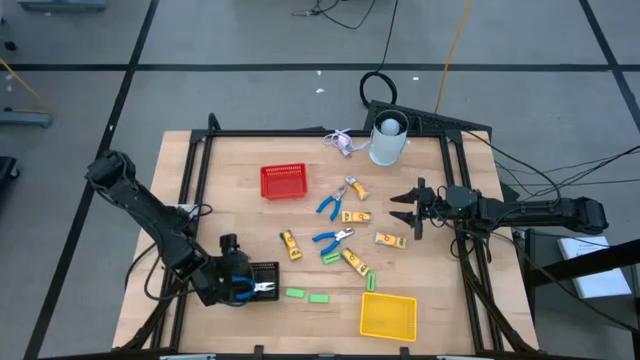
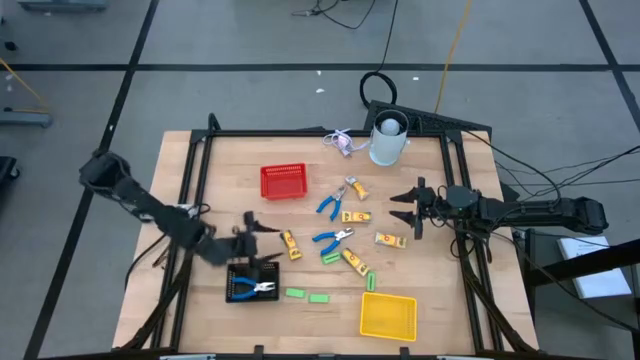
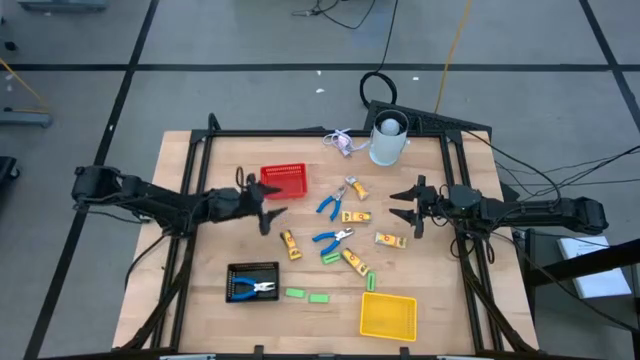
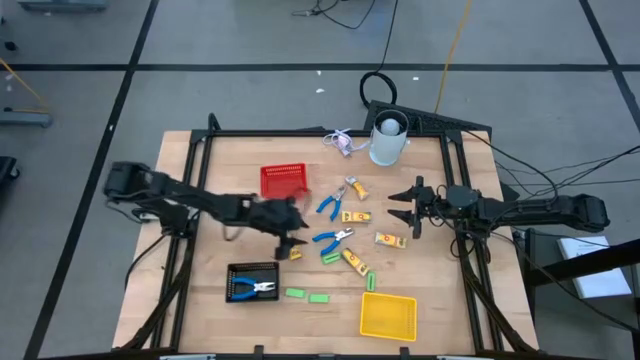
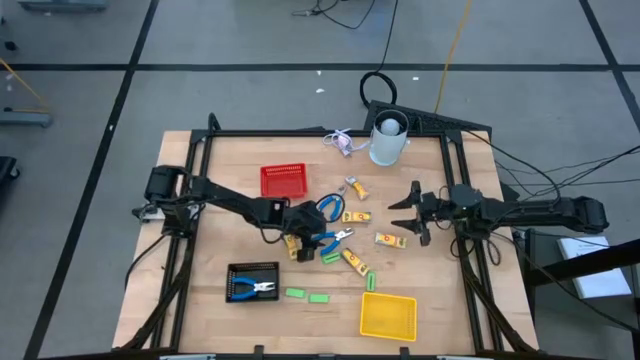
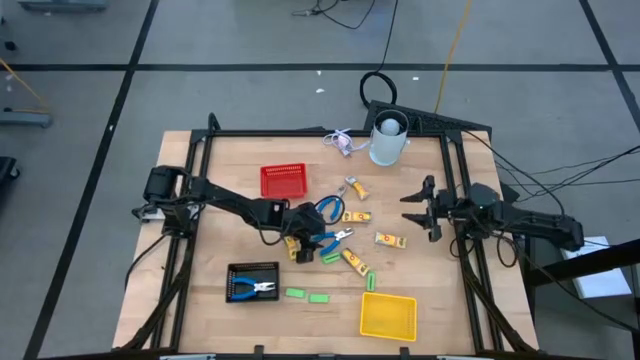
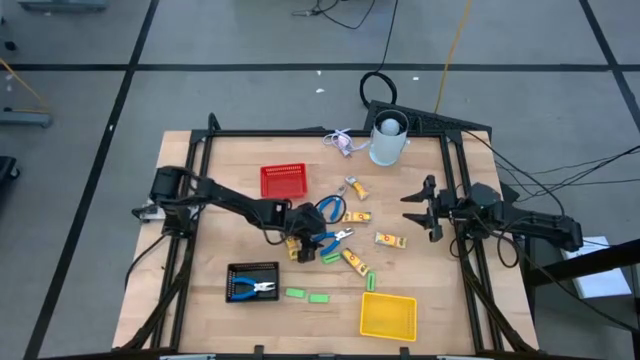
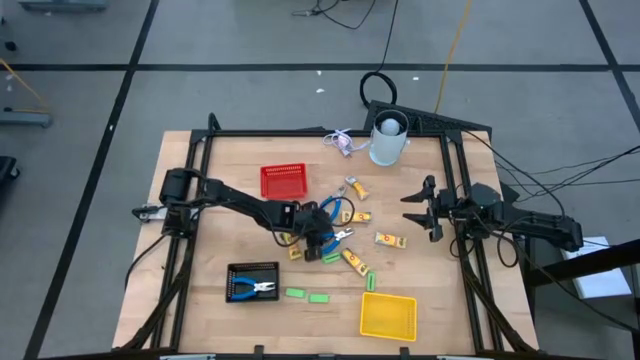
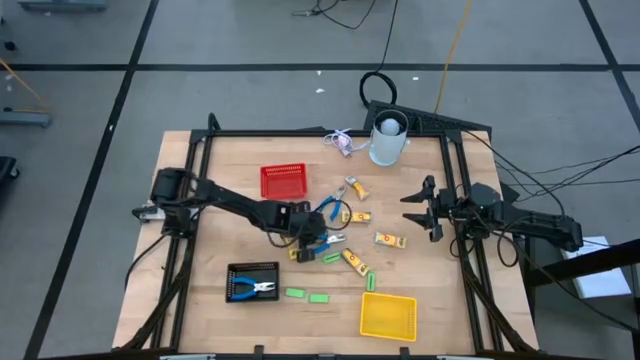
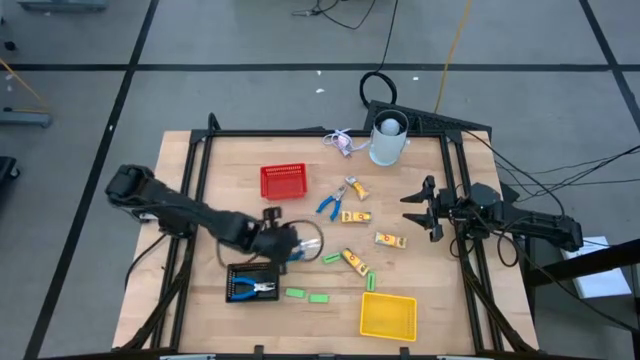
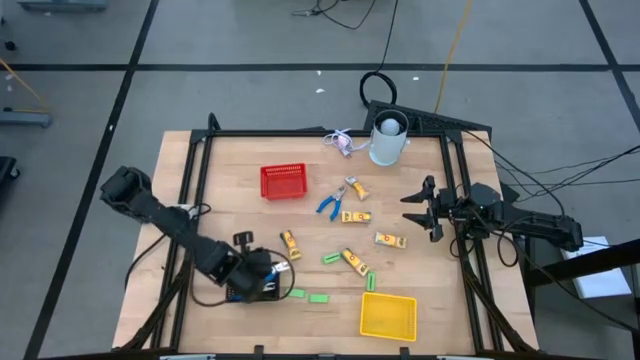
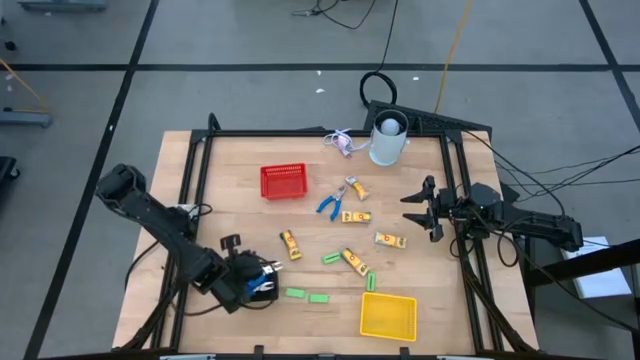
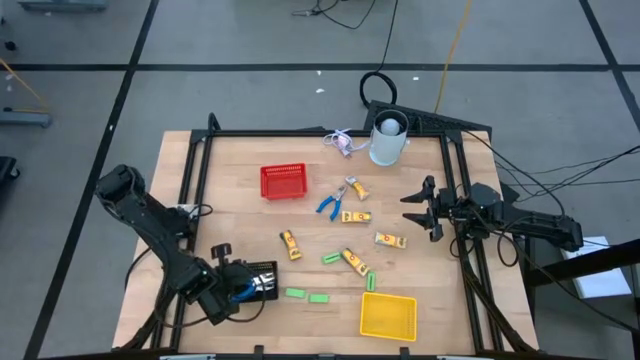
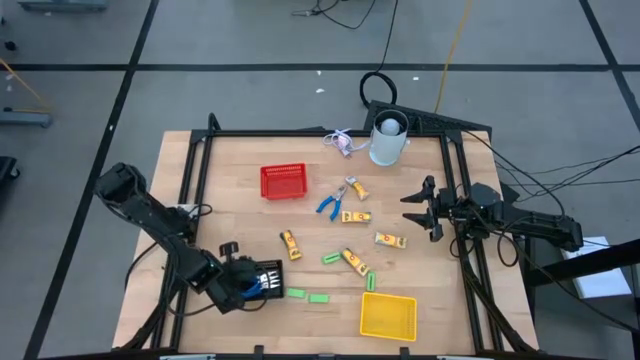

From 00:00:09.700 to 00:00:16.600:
Task: Pick & Place School Supplies
Put the blue hole punch into the black bin

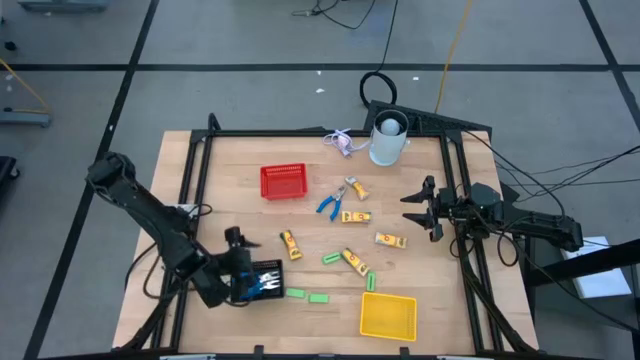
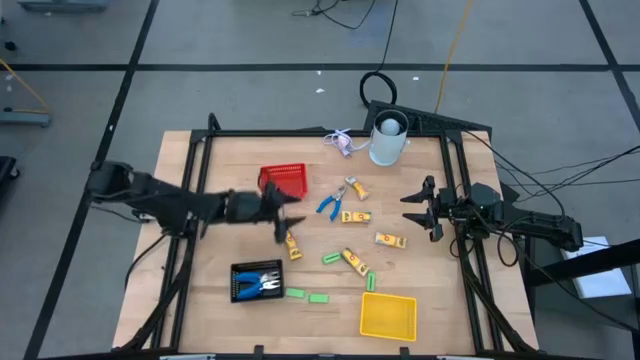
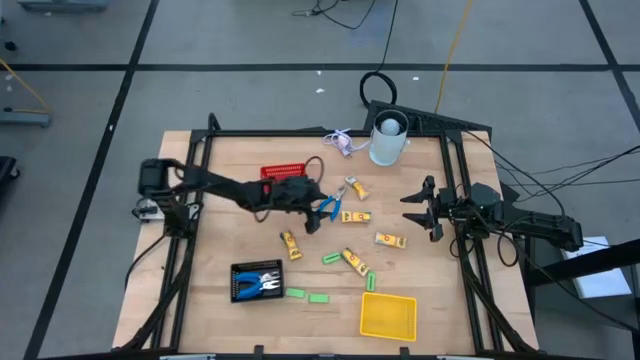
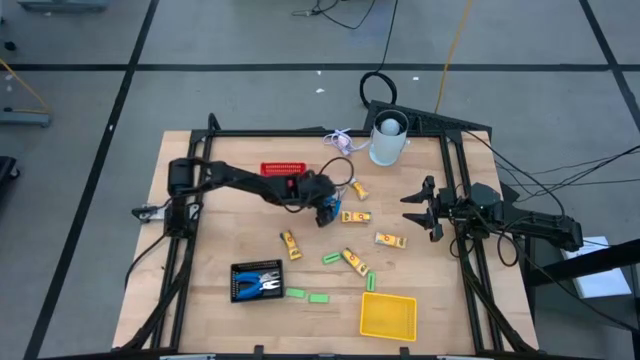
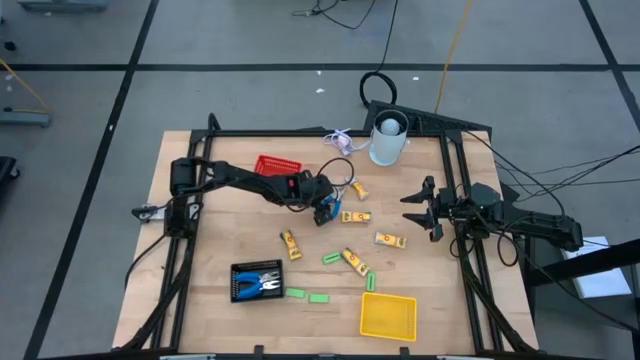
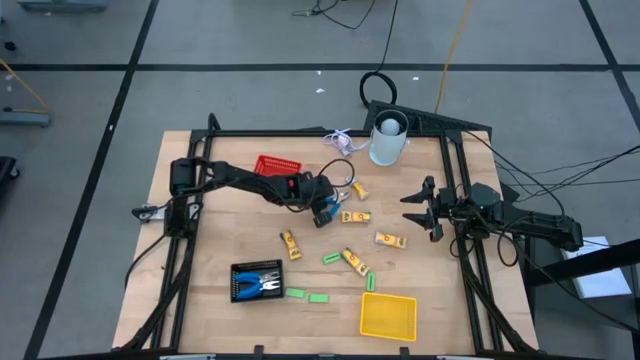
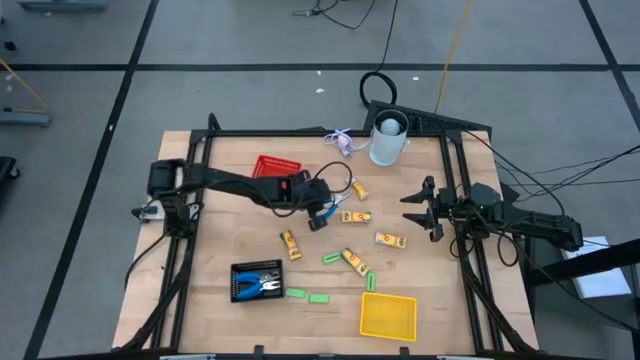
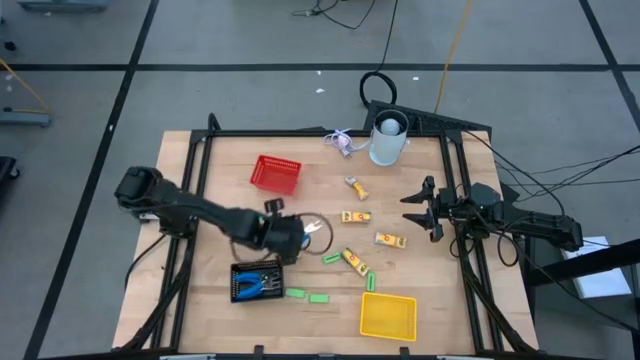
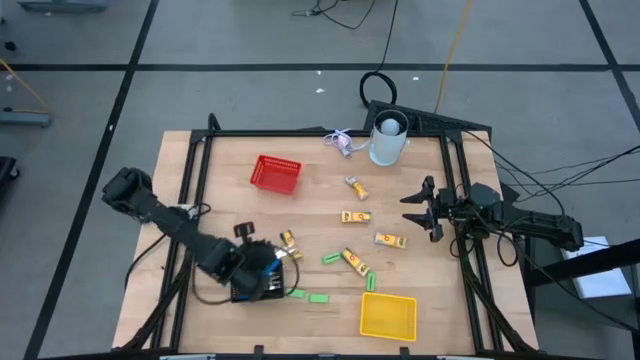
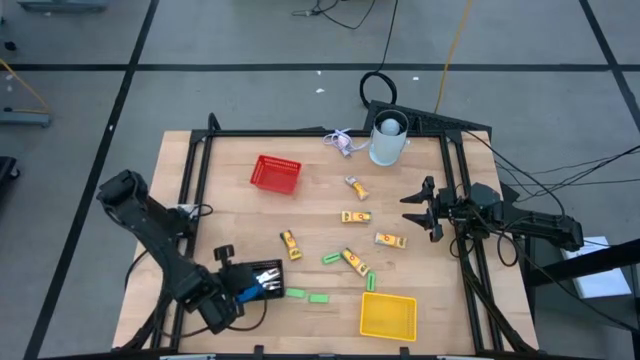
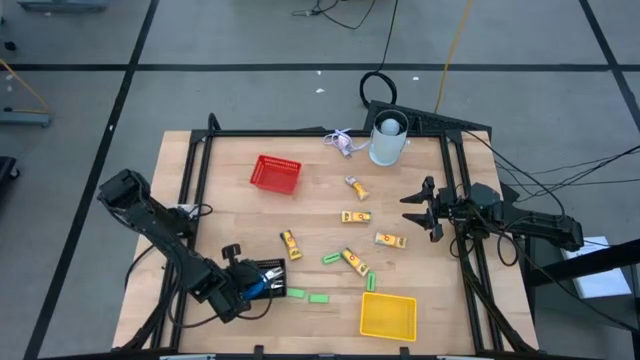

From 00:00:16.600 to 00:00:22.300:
Put the blue hole punch into the black bin

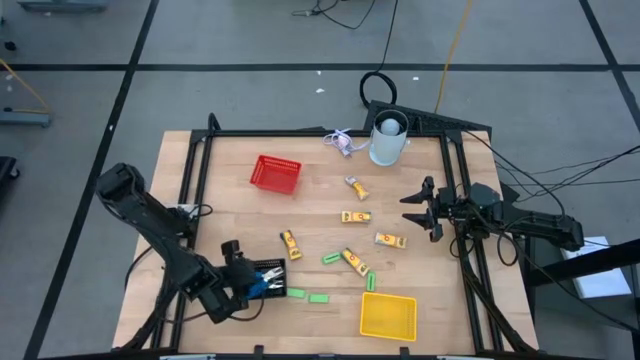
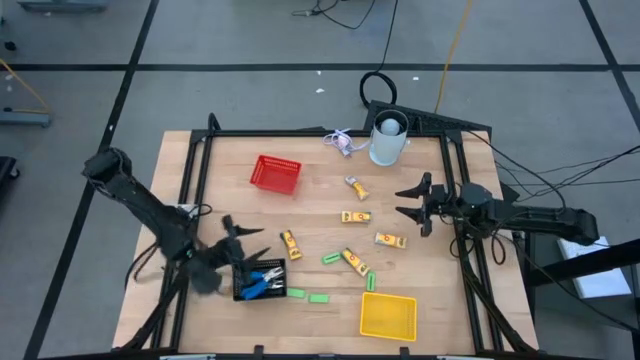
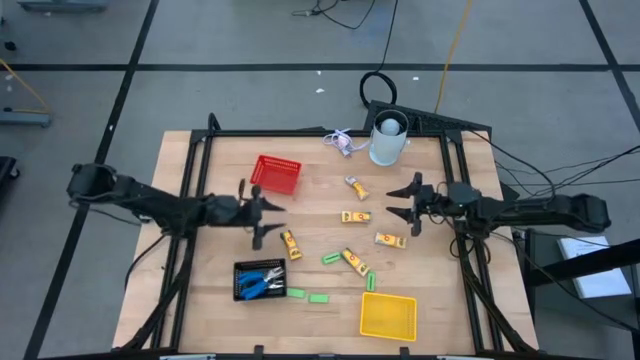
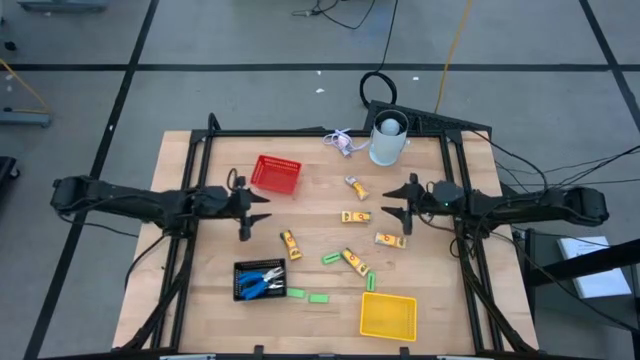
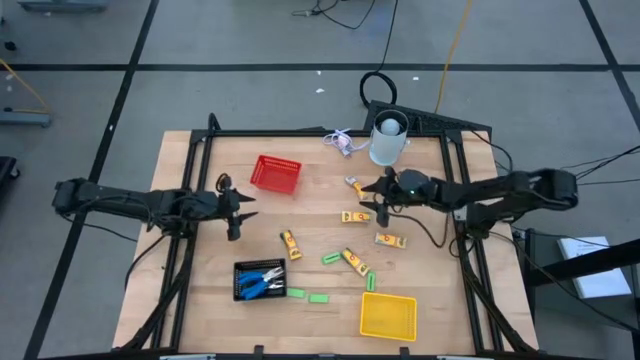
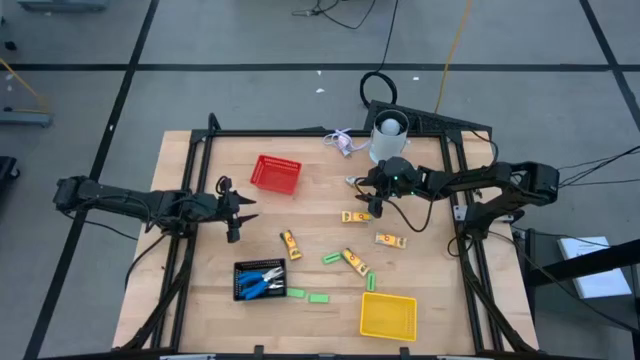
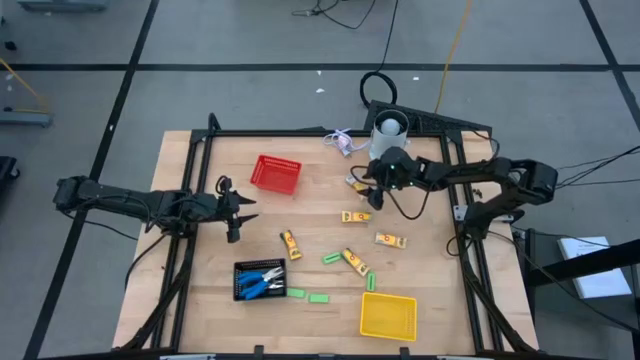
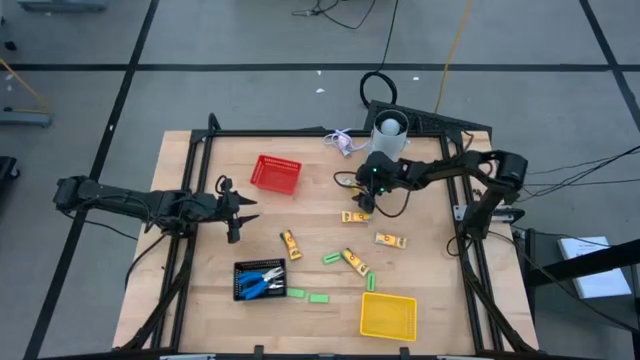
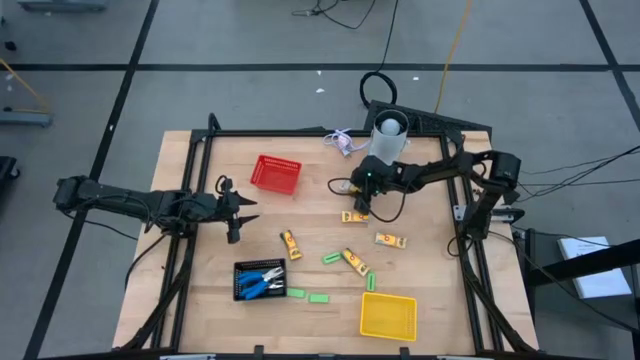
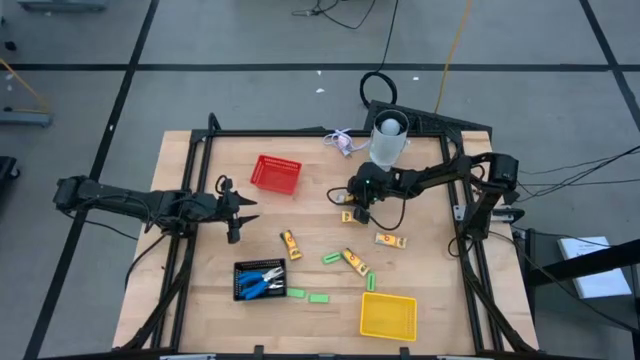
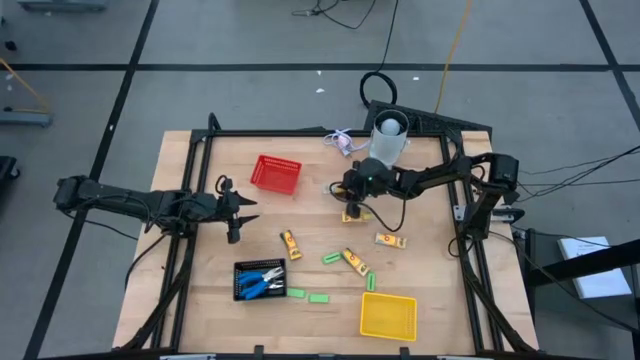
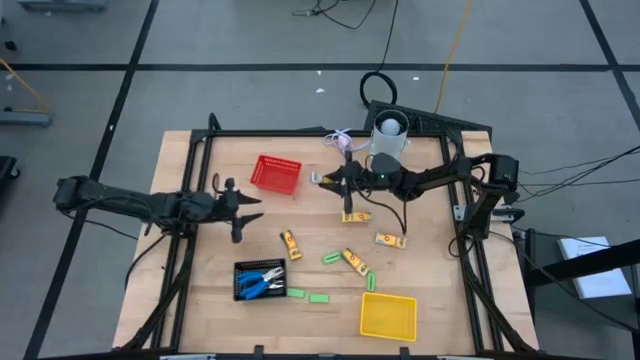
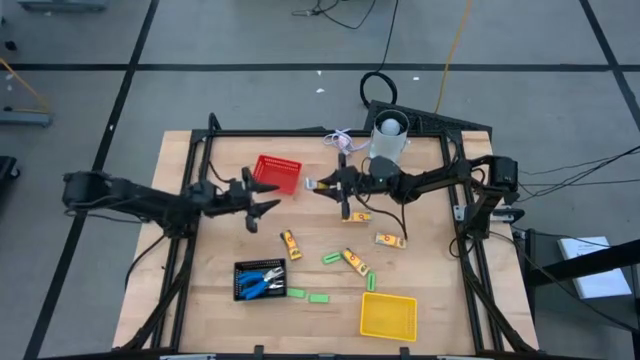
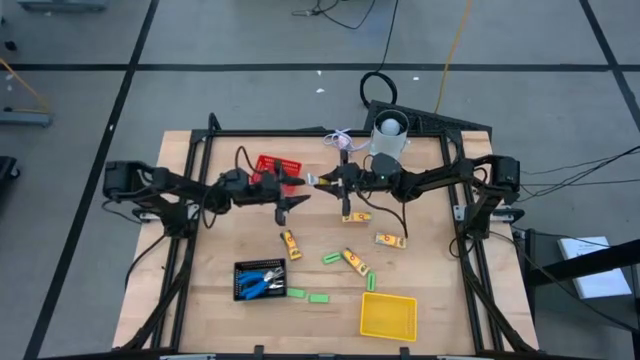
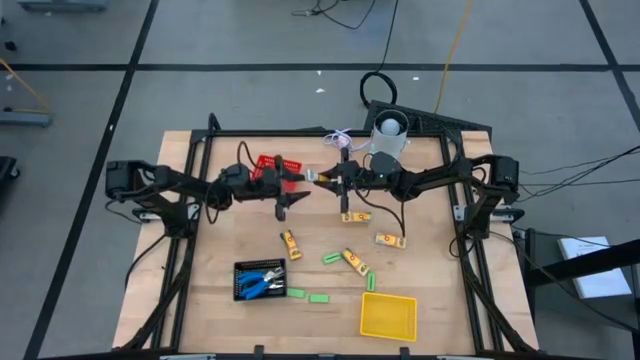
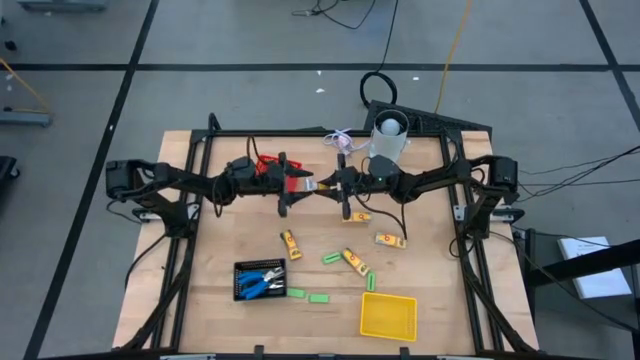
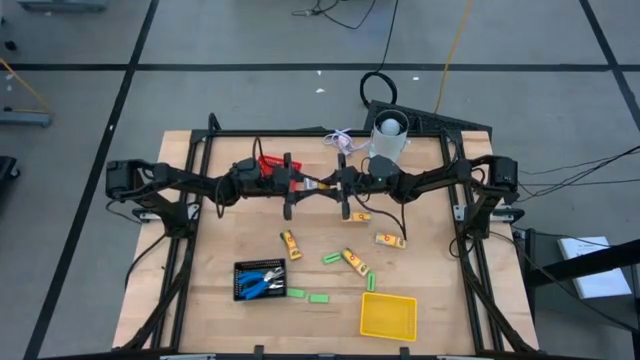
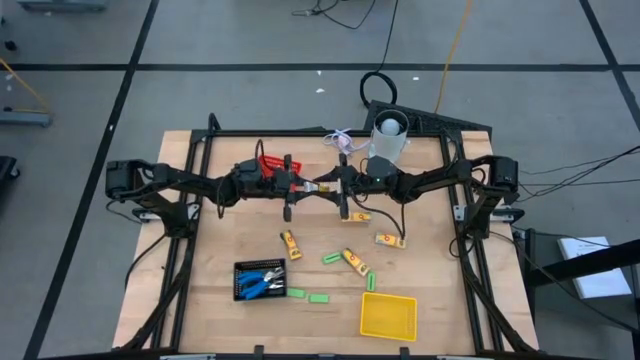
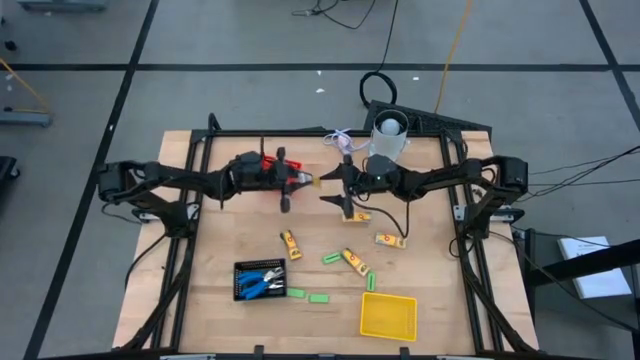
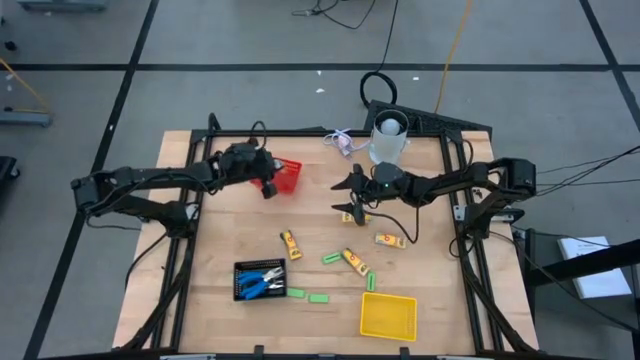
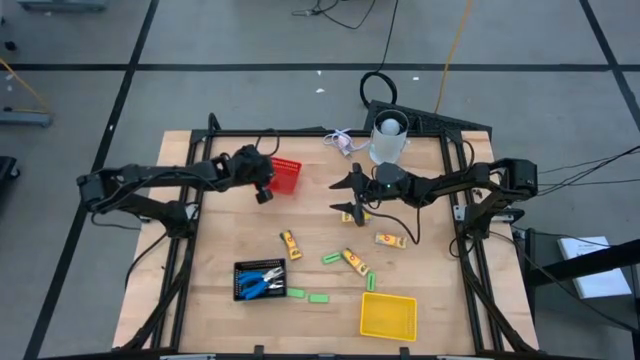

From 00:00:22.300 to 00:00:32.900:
Put the crayon box into the red bin
